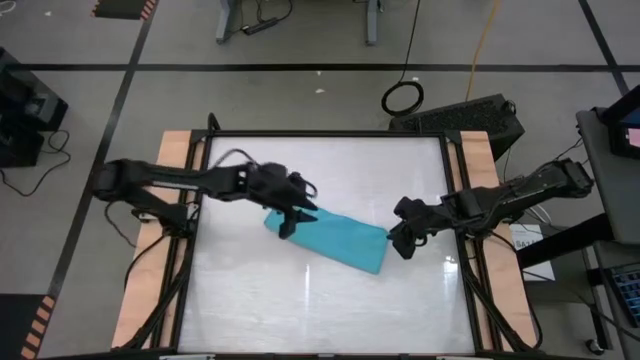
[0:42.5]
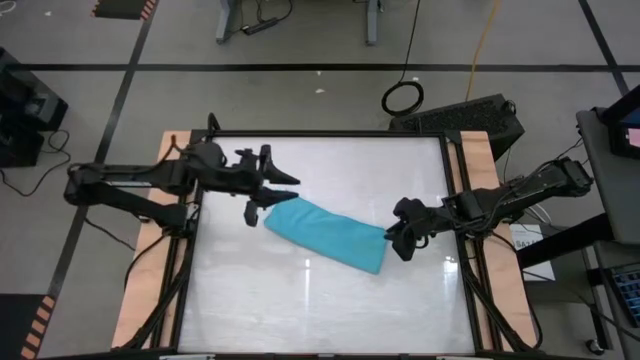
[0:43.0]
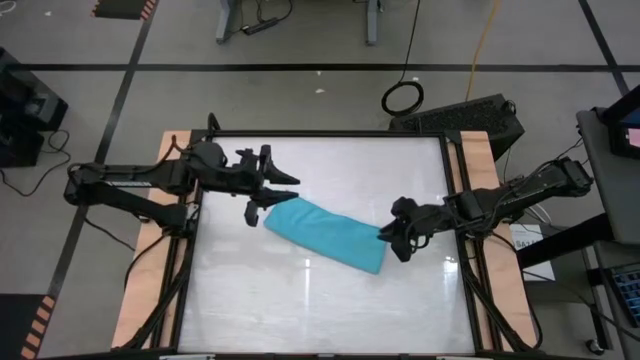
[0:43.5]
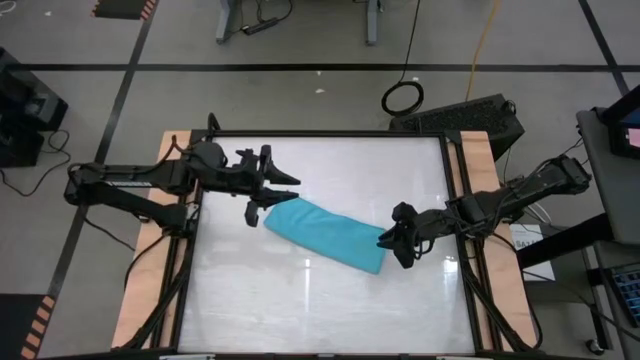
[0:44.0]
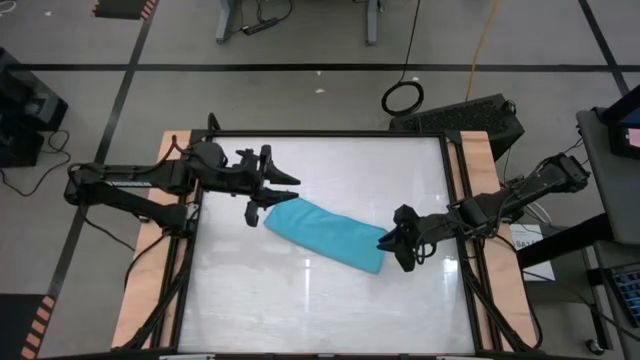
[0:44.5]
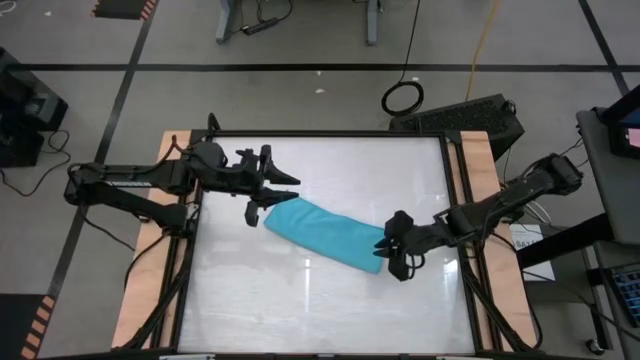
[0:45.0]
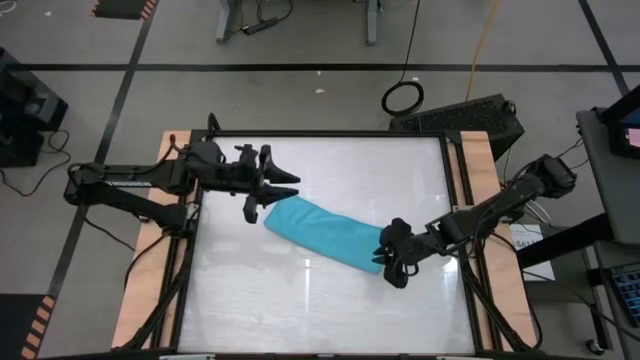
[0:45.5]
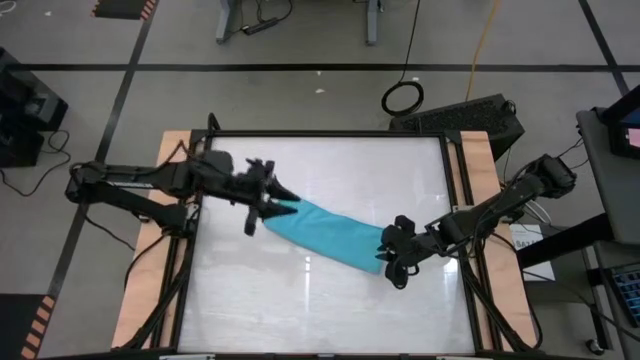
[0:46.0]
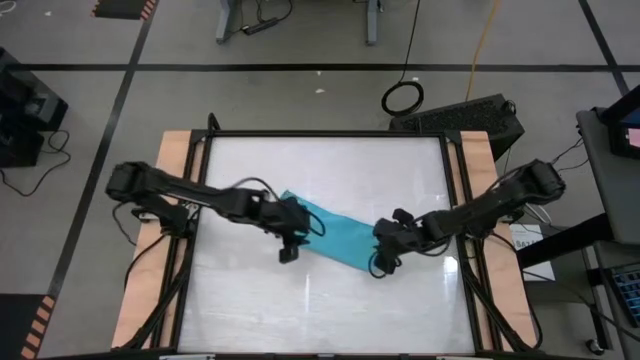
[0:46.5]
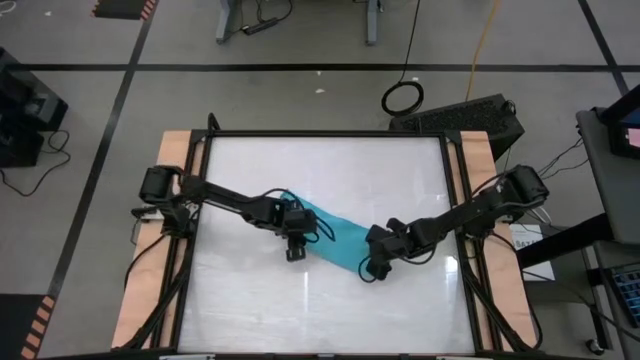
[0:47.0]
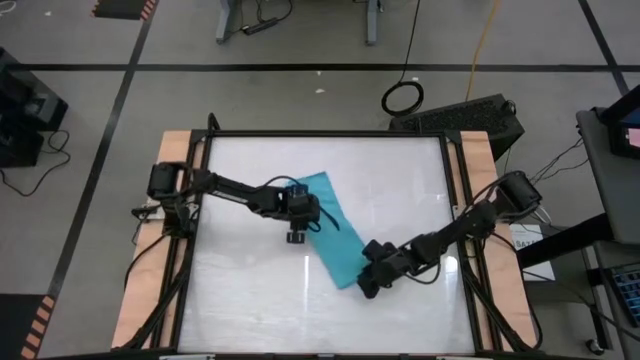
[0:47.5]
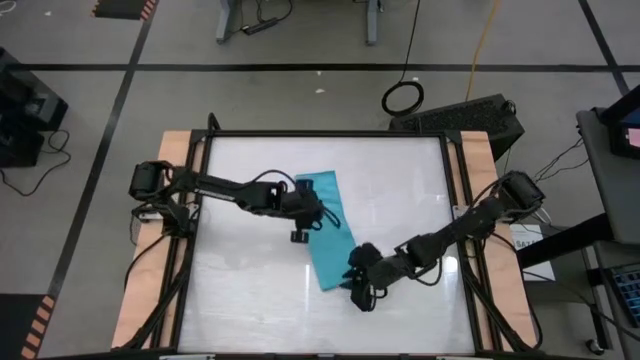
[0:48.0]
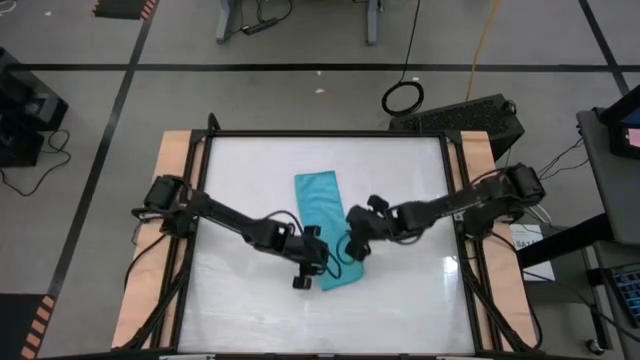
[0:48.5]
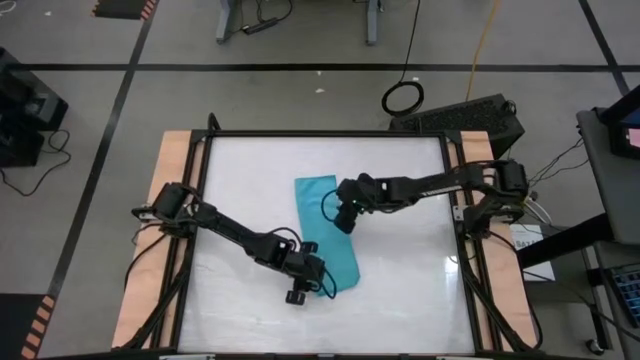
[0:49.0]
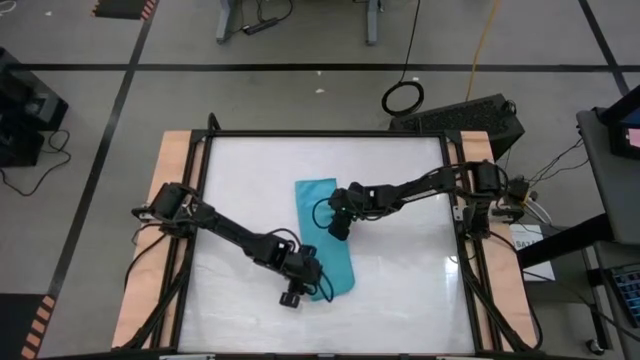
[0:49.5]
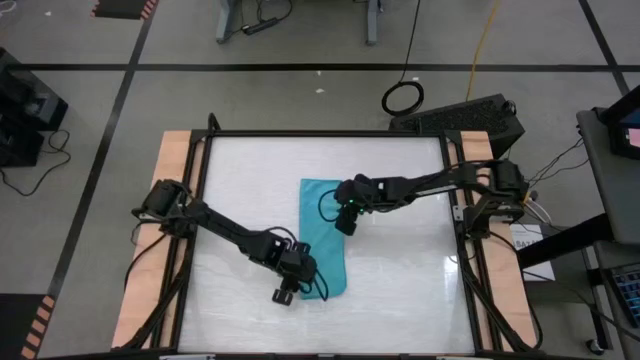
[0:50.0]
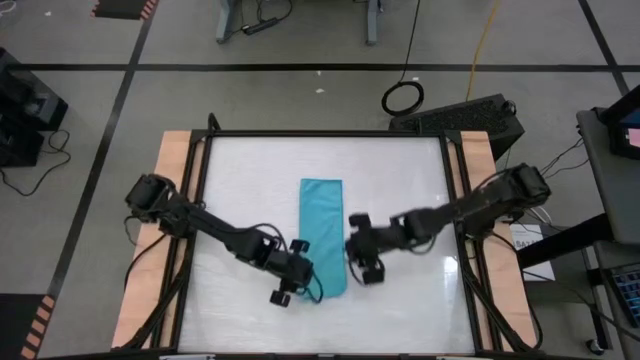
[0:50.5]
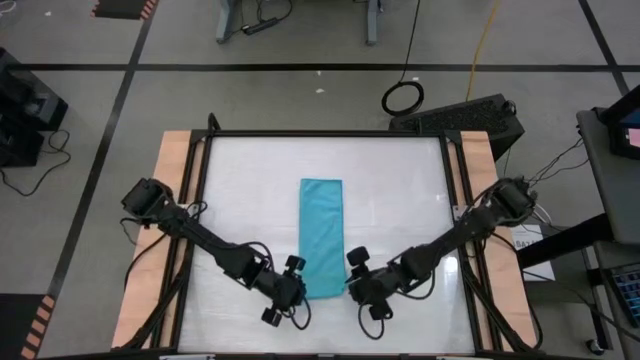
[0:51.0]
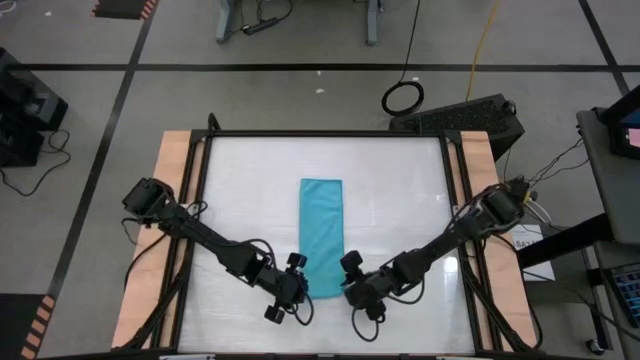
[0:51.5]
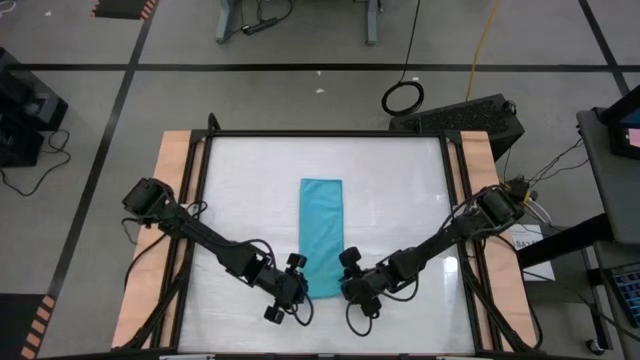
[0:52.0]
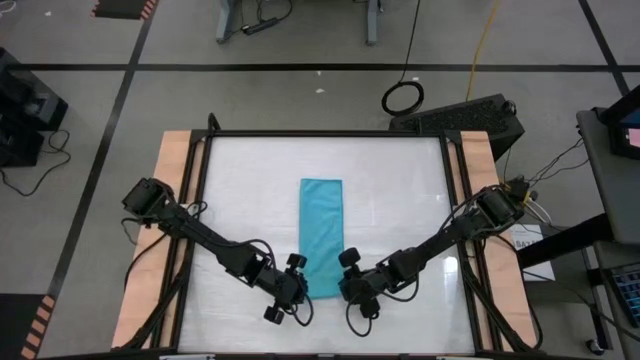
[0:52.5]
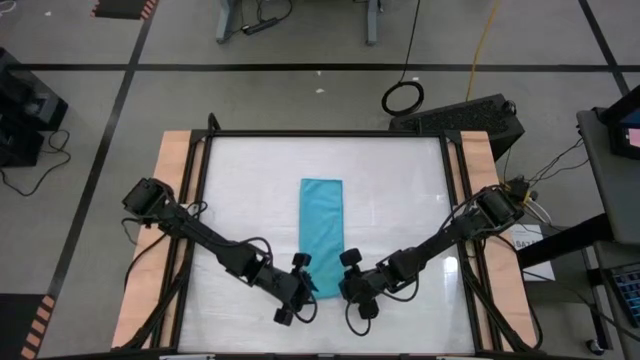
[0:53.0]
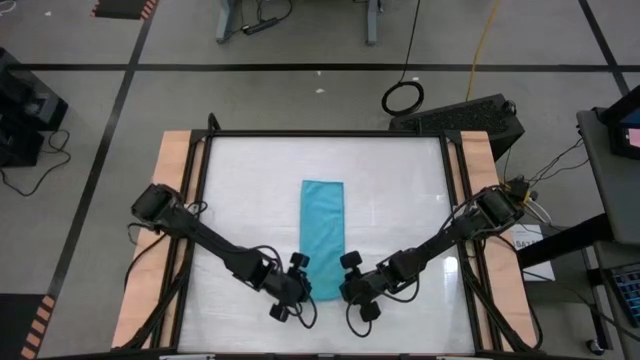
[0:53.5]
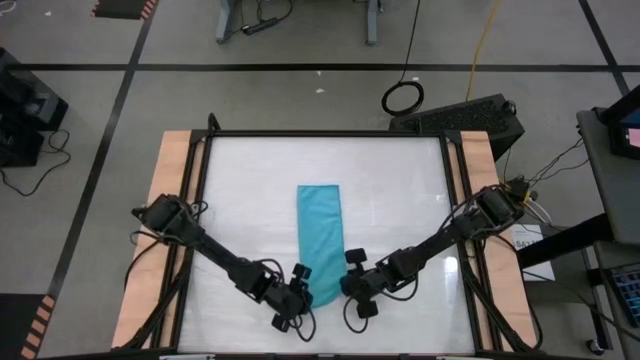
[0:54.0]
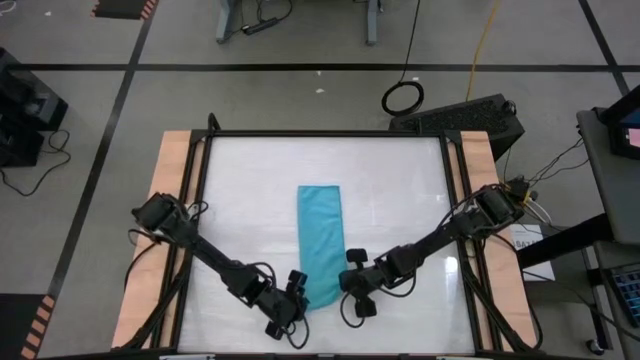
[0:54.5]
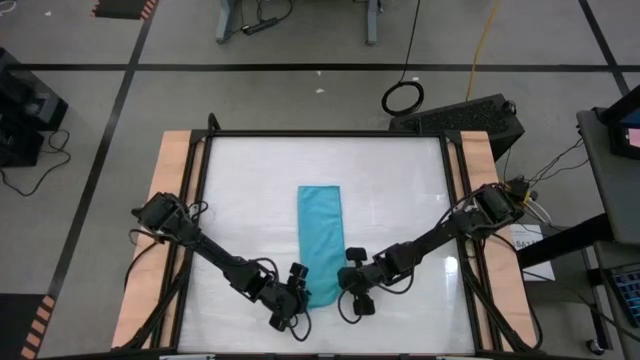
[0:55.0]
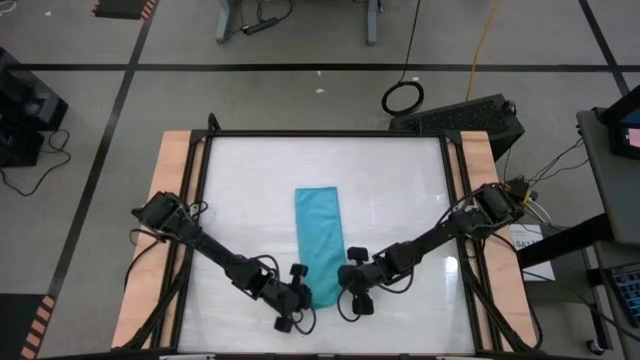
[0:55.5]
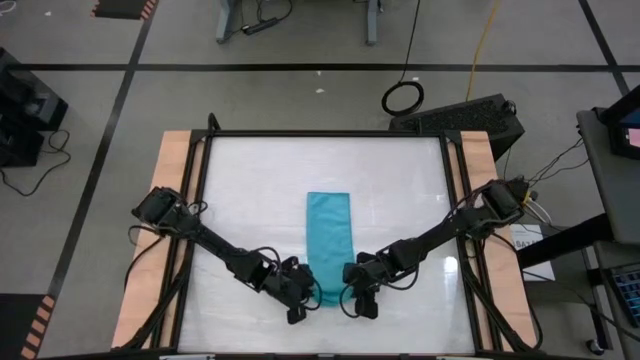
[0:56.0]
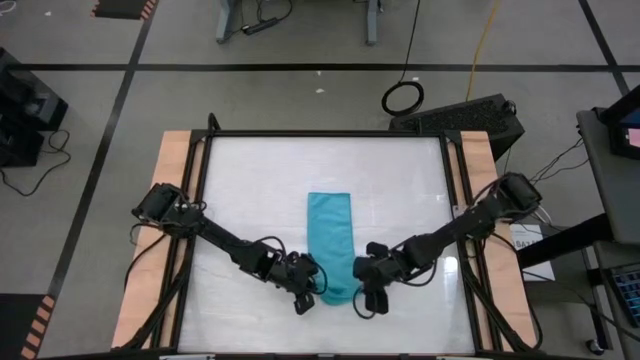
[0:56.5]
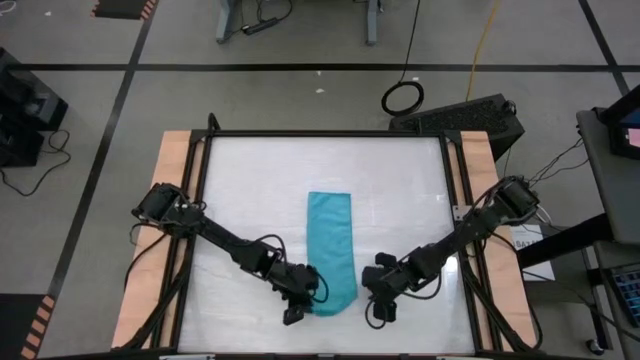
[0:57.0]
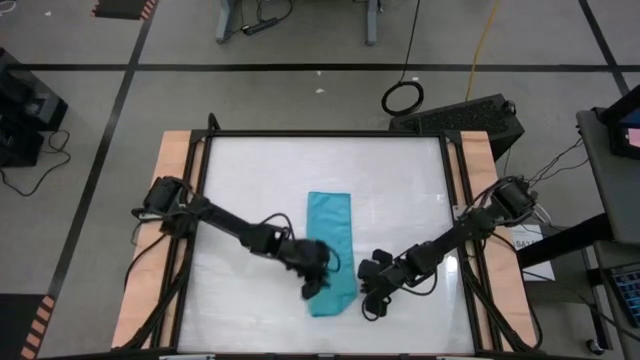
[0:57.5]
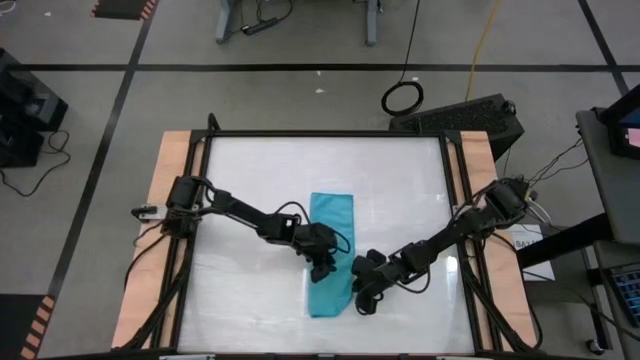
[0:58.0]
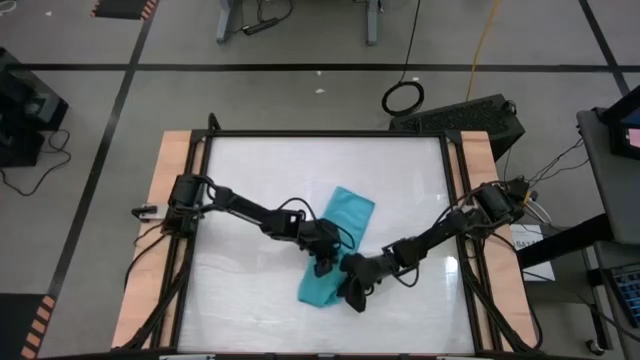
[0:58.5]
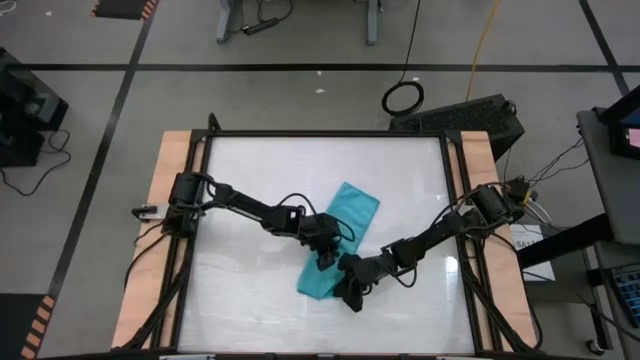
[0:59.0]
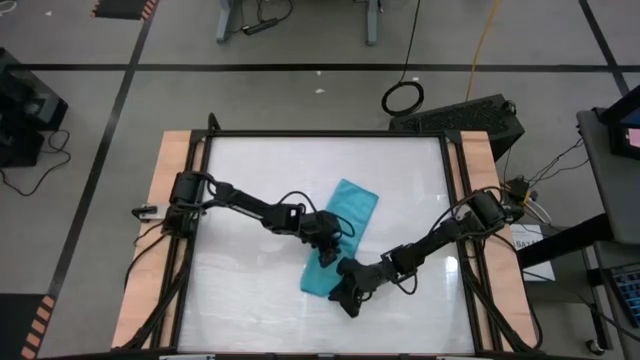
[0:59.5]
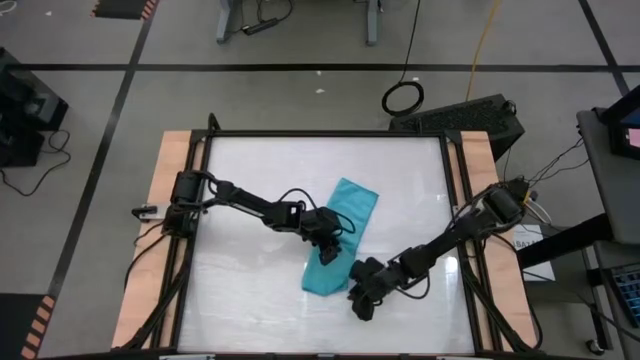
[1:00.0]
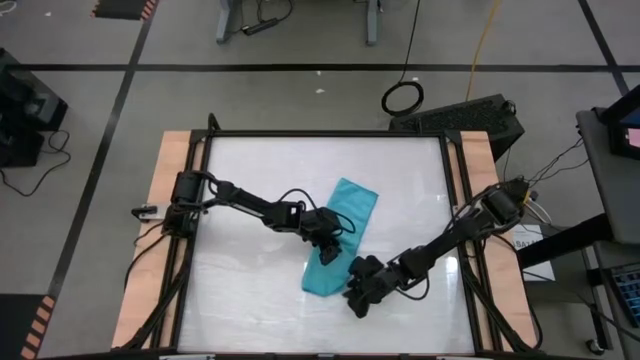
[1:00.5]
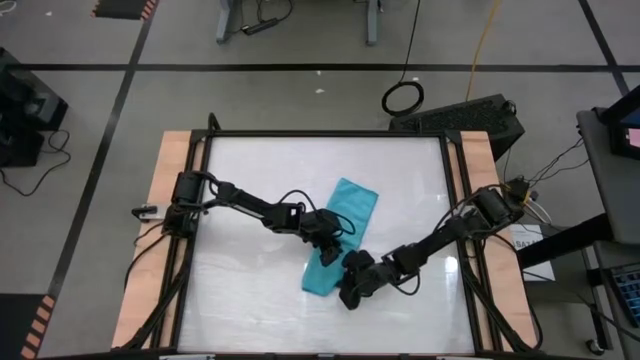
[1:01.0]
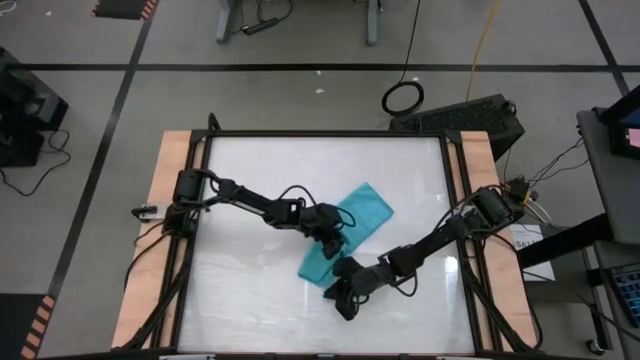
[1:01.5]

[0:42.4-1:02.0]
Task: Roll towel
Roll the blue microfiber towel

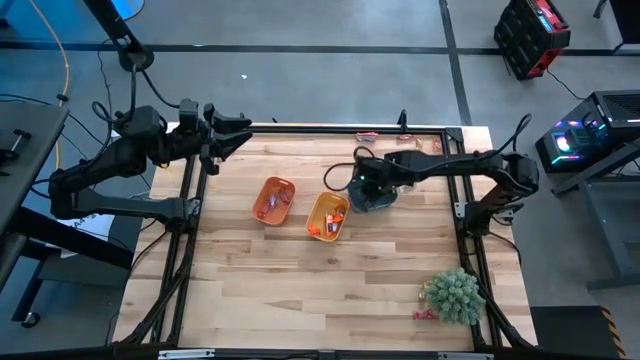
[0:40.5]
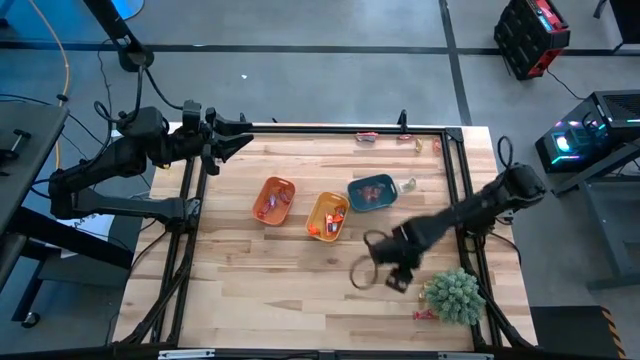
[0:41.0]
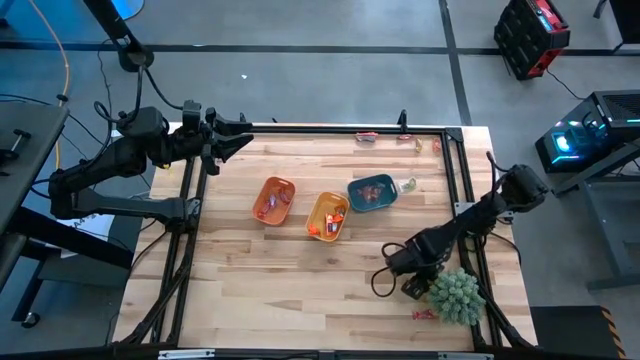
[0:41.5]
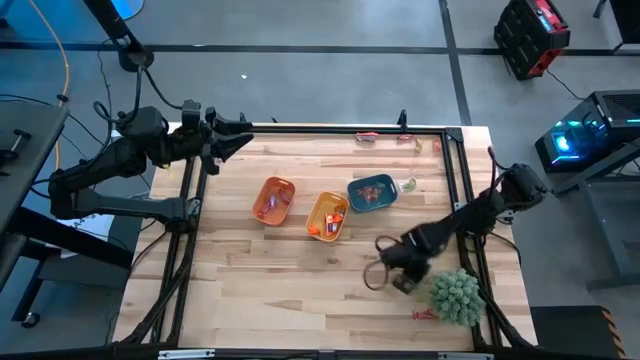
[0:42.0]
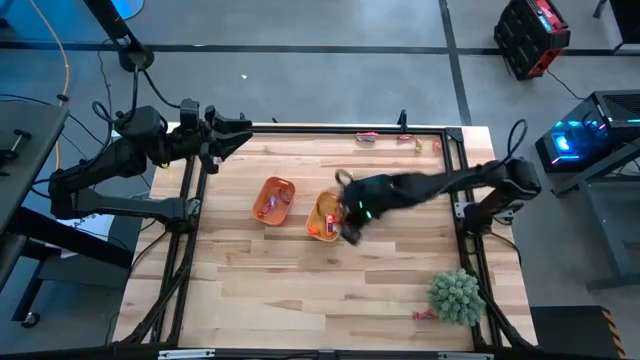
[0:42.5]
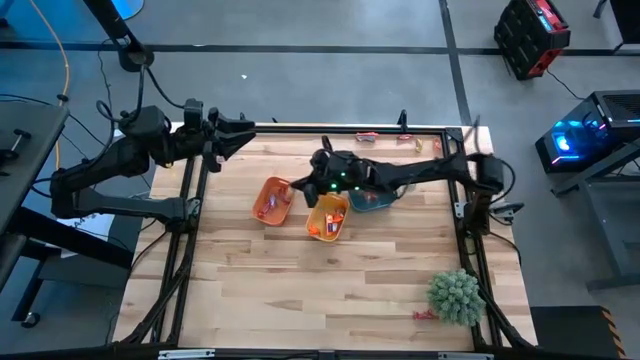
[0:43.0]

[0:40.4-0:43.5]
Task: Sort candy
Put the yellow candy into the orange bin

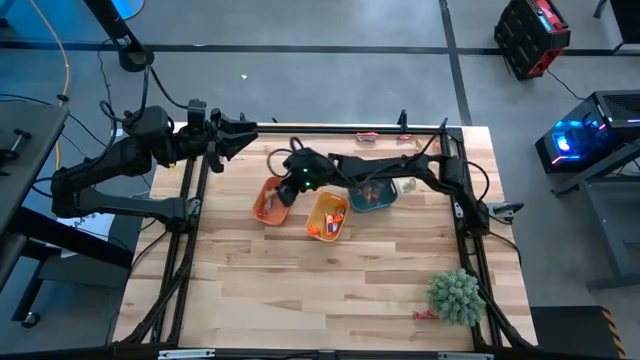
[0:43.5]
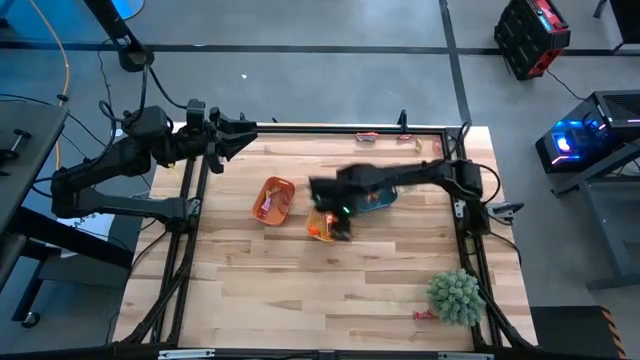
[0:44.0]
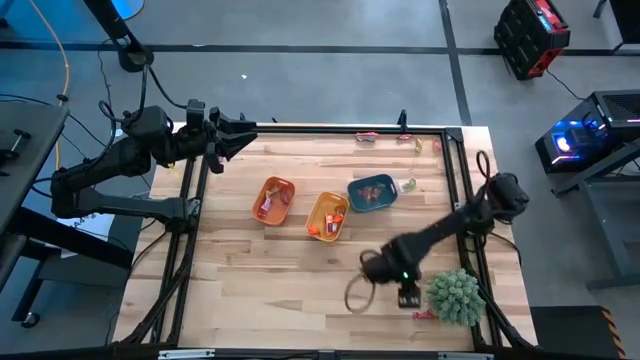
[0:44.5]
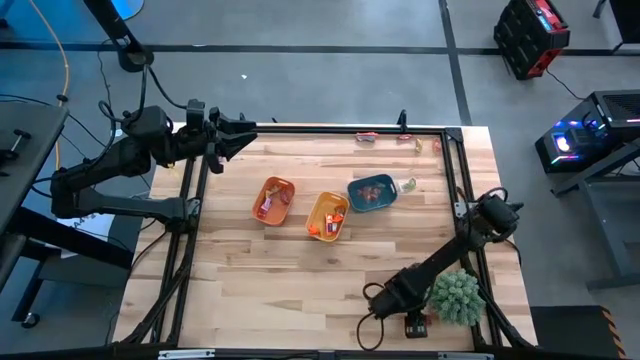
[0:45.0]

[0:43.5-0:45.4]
Put the red candy into the orange bin
